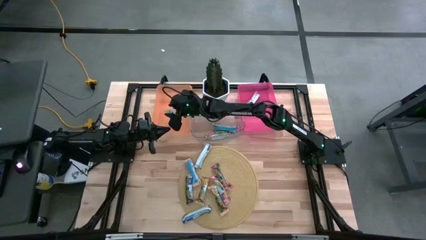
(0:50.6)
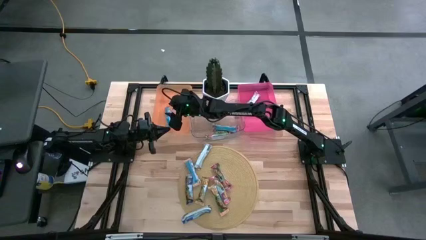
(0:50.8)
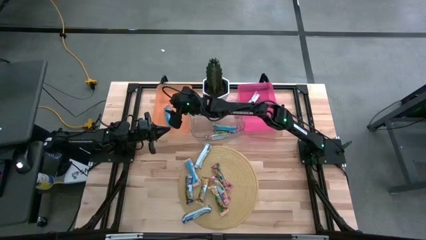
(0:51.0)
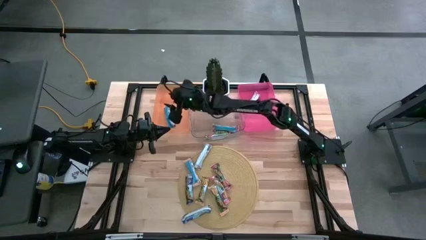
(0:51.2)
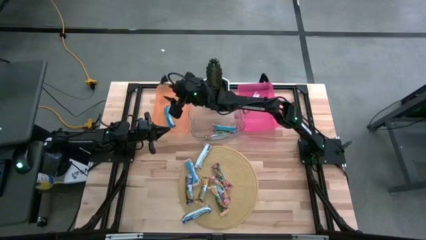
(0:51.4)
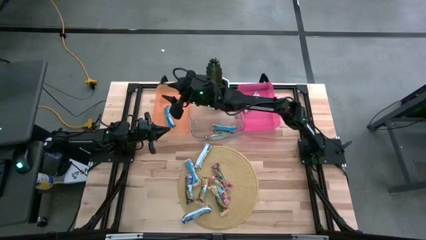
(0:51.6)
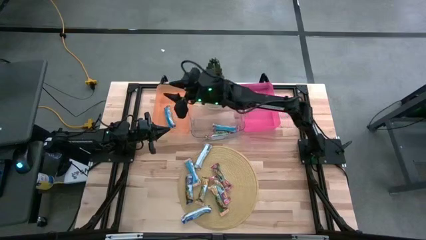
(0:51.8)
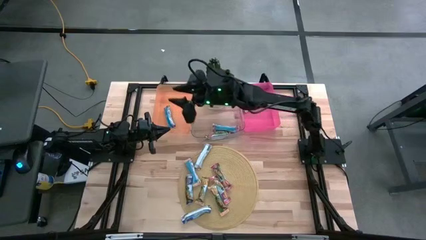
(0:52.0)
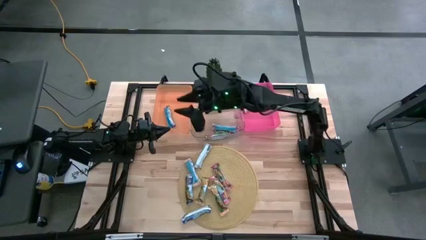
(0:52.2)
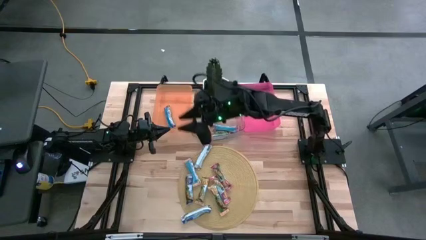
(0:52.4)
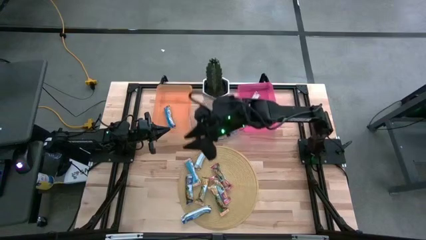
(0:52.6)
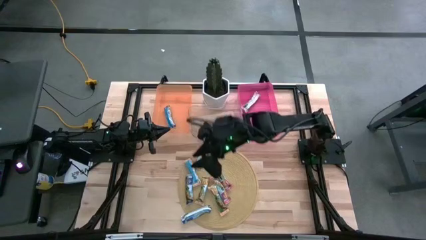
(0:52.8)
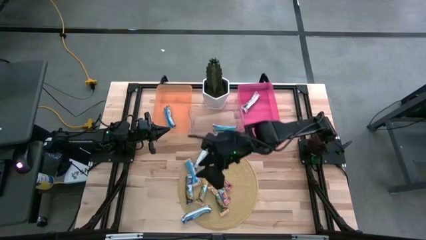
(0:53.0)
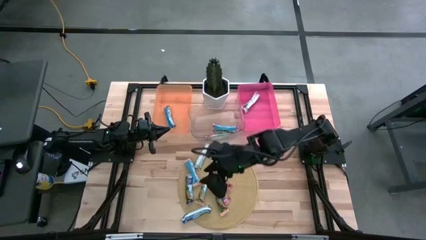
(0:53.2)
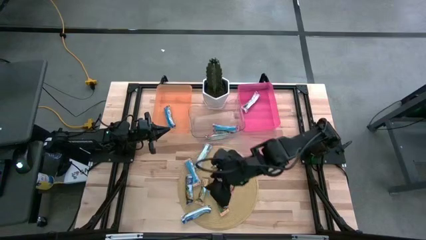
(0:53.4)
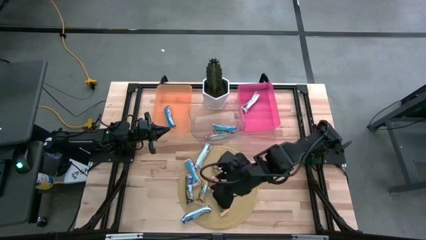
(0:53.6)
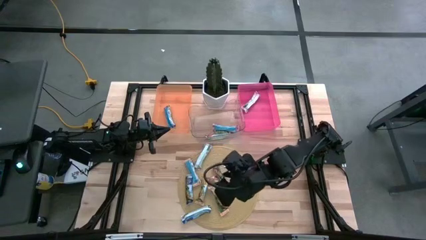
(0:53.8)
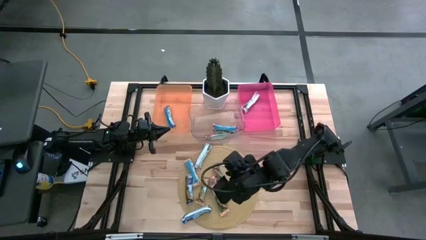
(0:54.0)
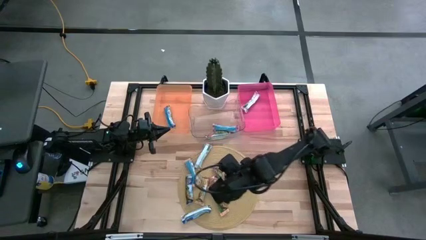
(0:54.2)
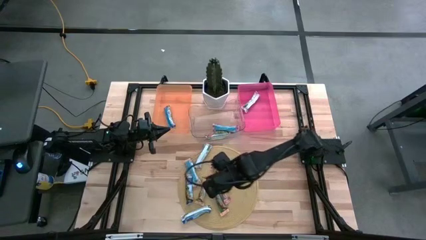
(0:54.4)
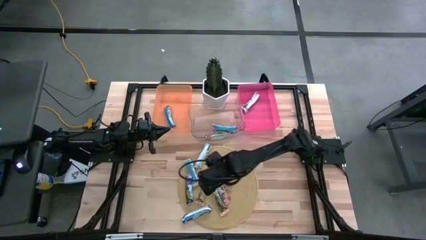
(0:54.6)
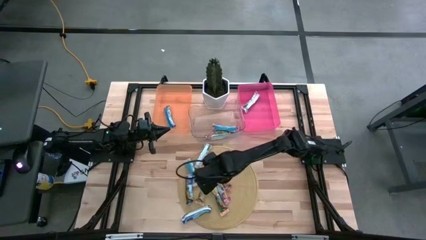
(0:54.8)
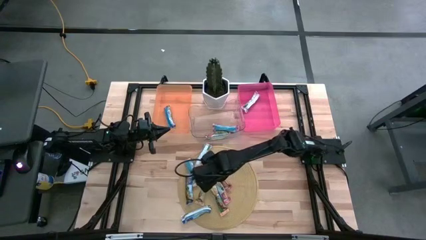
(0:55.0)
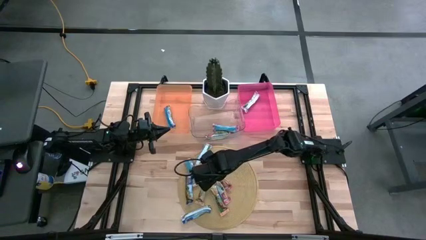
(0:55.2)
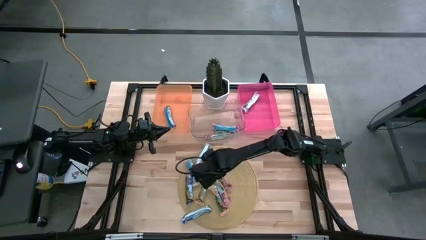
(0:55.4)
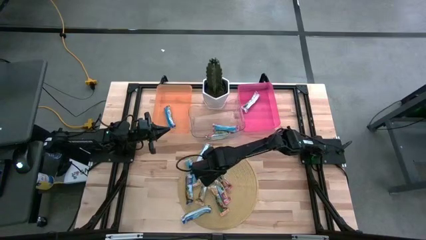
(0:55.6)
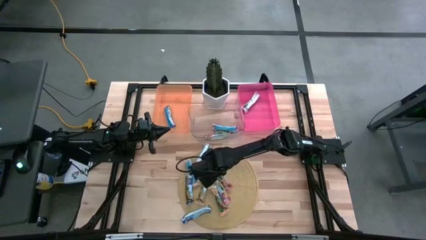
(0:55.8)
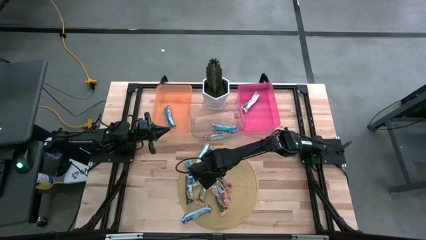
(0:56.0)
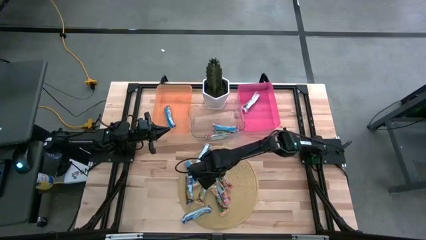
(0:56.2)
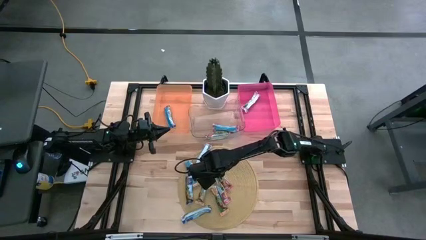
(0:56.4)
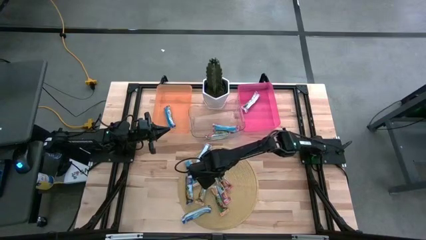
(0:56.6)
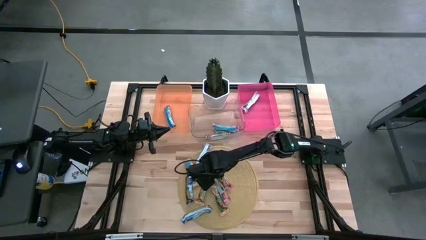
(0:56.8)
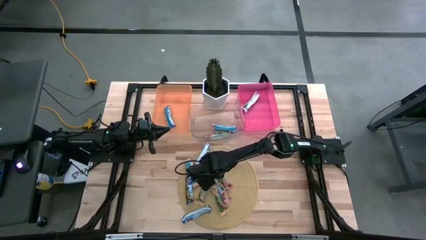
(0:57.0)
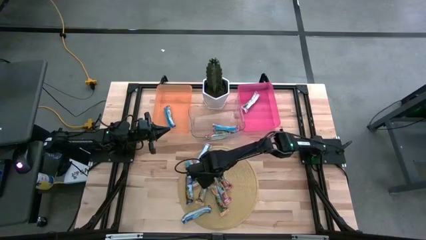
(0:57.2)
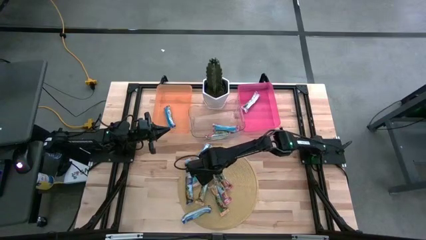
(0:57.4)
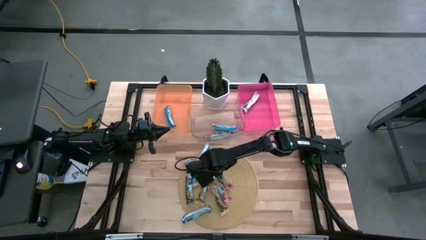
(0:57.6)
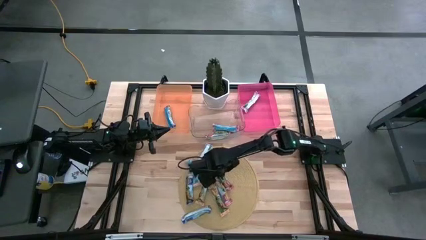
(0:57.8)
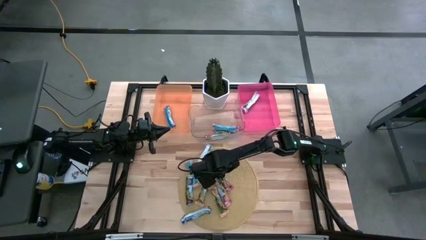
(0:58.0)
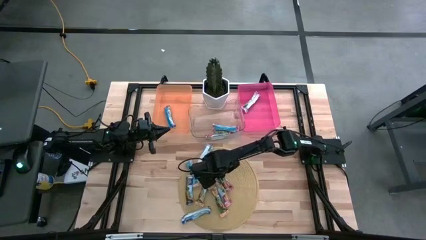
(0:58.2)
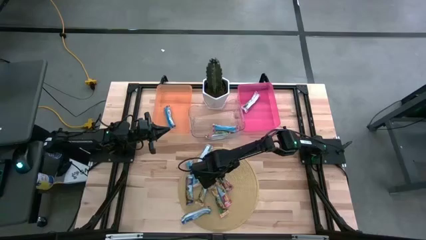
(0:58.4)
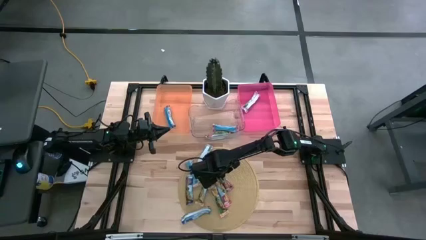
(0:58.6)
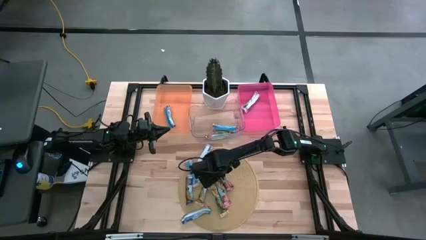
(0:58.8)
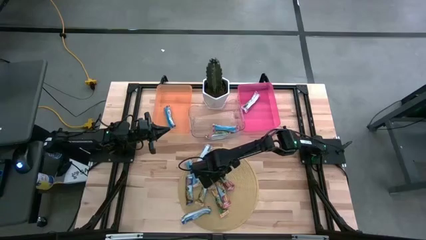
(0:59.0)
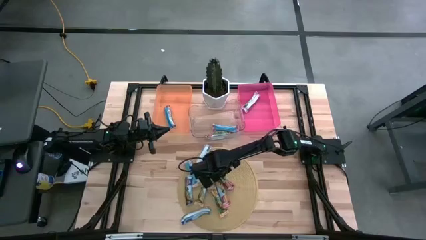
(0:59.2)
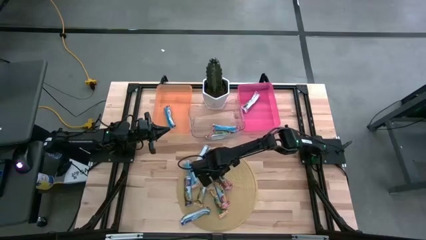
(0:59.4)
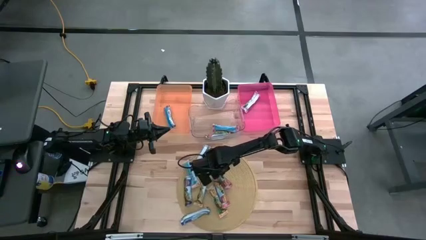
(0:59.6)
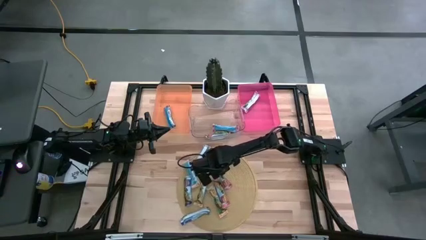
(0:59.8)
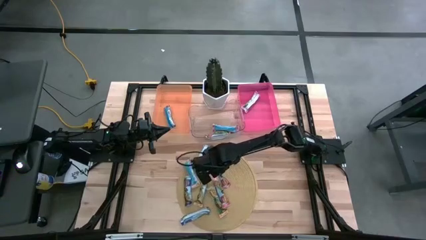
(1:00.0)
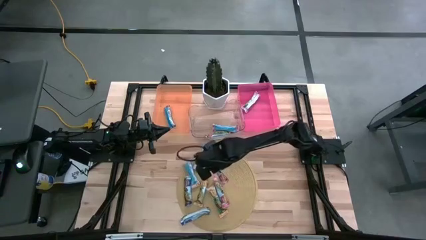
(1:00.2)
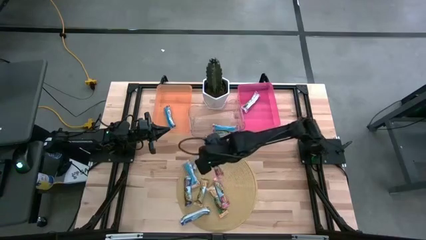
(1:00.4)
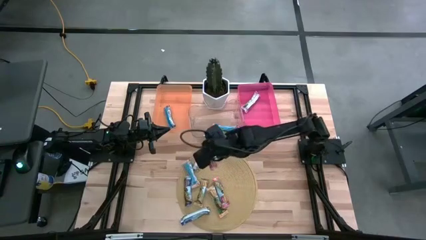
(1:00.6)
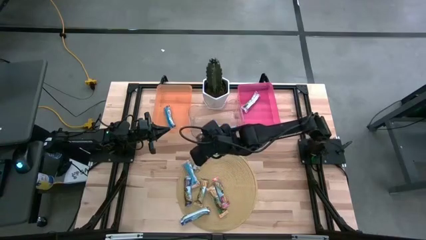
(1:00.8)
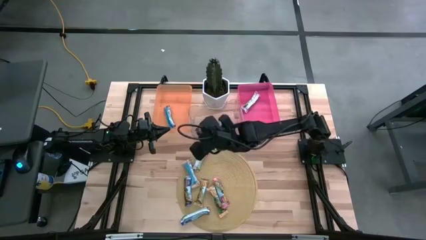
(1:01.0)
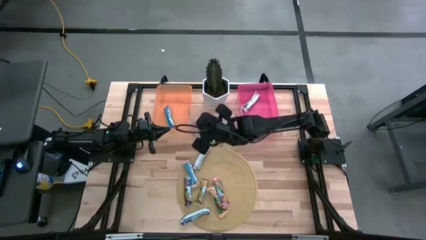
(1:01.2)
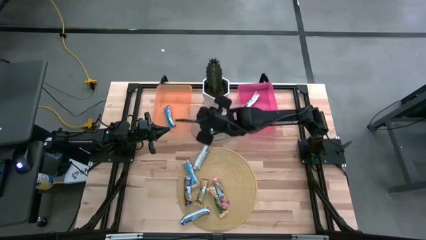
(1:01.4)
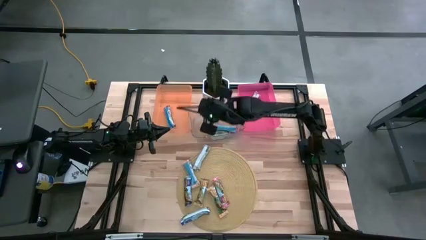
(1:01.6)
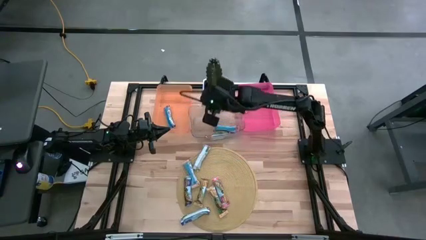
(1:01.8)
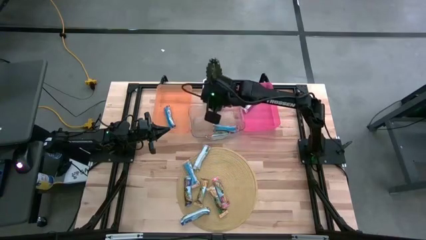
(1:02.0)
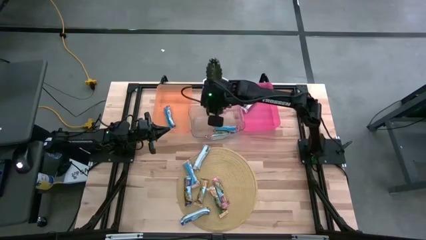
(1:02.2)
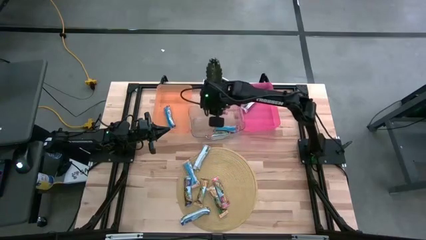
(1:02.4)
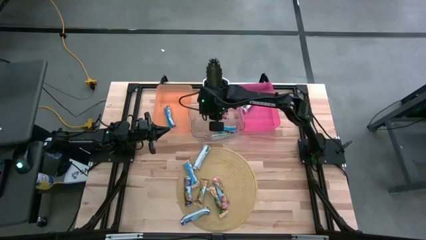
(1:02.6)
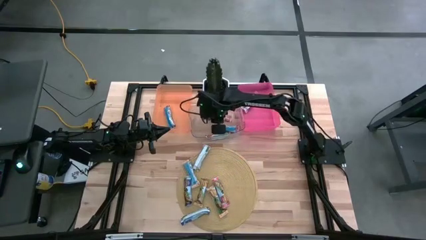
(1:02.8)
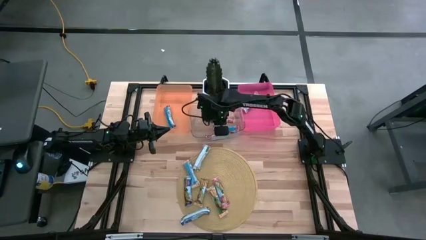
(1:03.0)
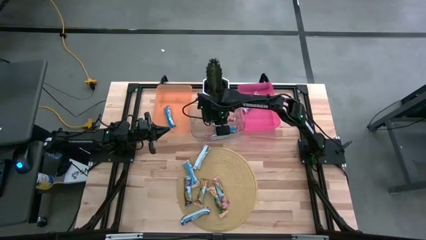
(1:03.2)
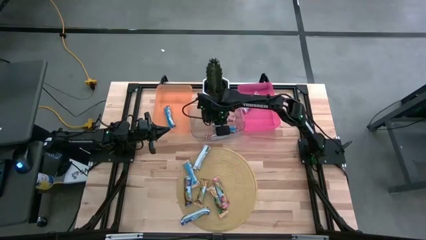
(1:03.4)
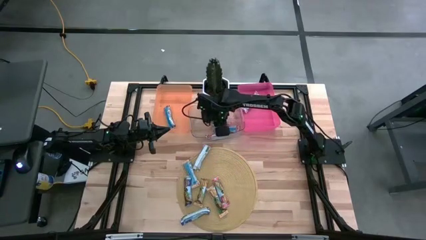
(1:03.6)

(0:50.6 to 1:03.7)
Task: Pick and place Granola Bars by type
Put the red granola bar into the transparent bin
